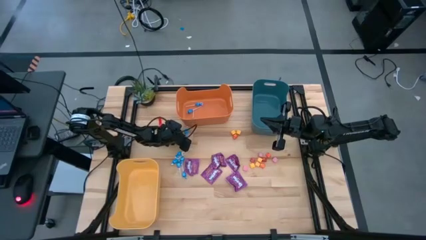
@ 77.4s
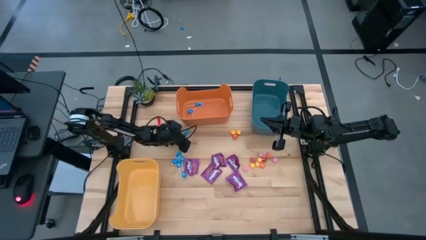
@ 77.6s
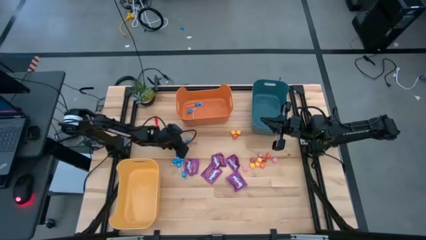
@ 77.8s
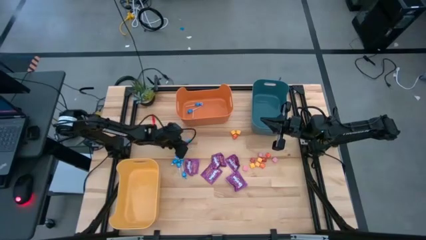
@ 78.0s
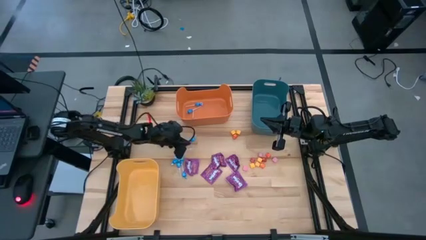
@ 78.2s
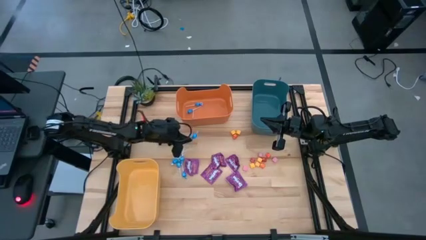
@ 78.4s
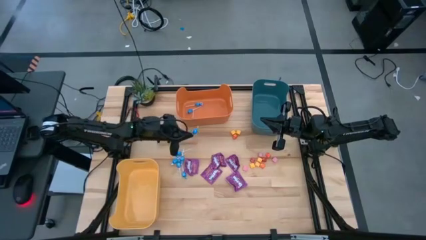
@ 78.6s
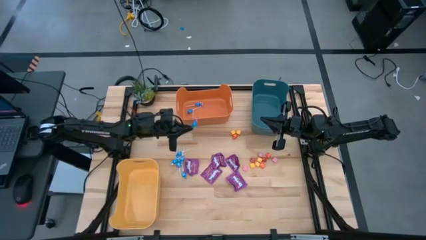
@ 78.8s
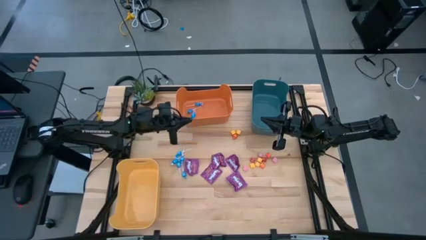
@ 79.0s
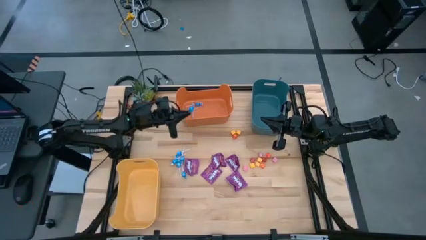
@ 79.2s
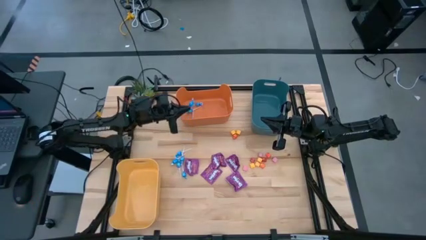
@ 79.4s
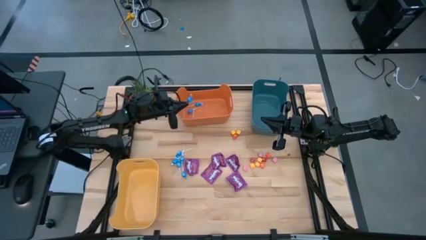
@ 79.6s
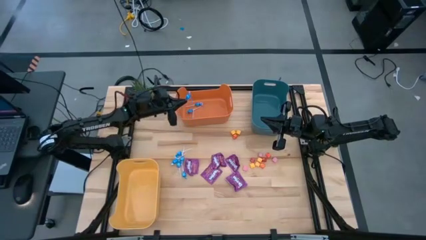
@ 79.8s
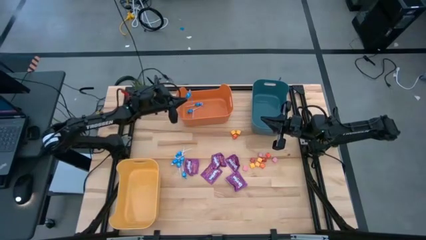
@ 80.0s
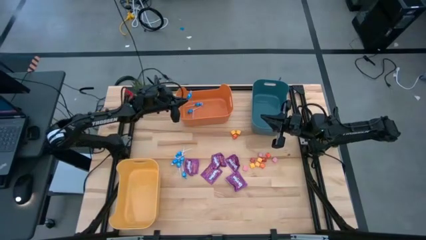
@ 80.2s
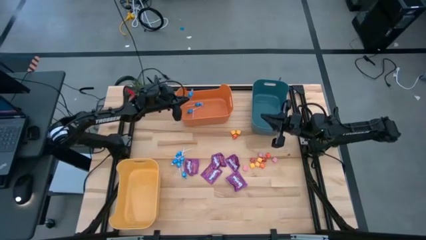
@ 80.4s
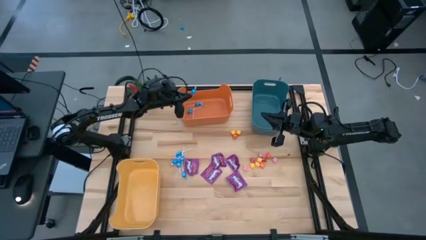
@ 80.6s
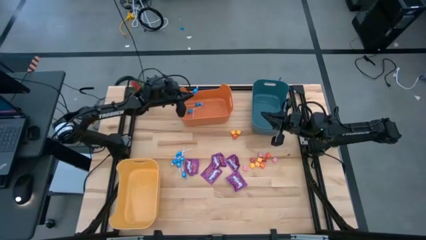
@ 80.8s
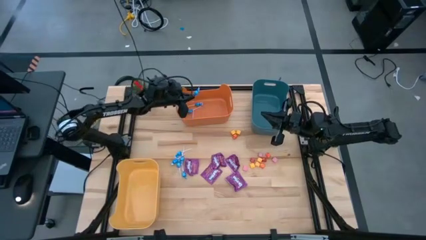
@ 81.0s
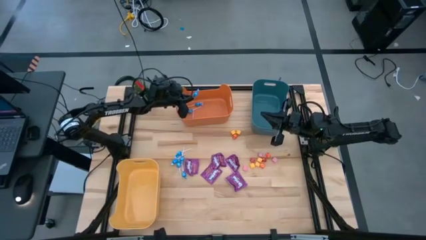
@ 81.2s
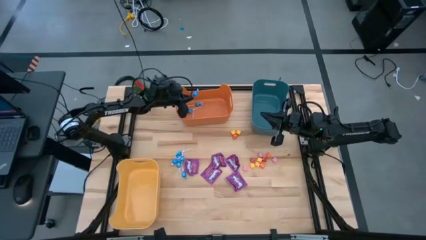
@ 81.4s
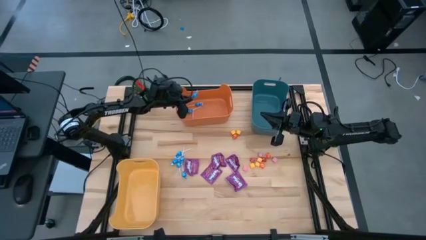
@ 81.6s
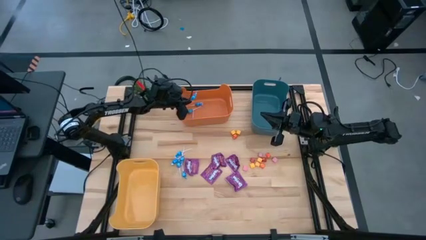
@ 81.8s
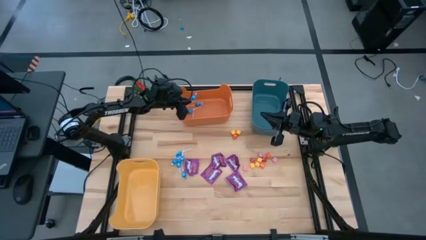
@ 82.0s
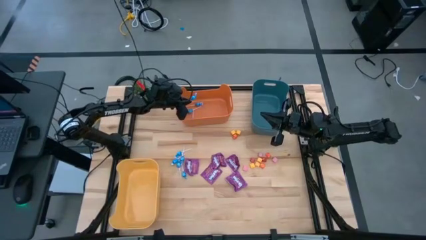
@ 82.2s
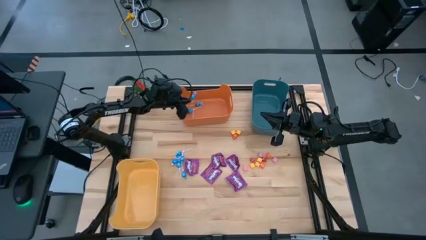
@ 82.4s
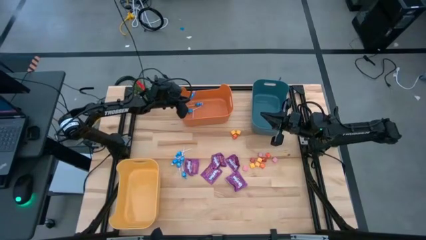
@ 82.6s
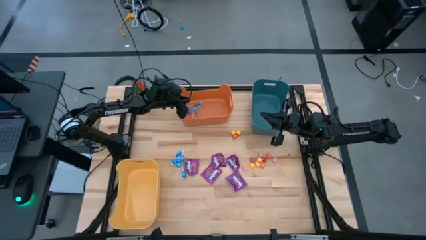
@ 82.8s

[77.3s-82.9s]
Task: Sort candy
Put the blue candy into the orange bin

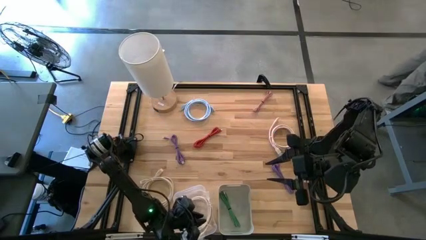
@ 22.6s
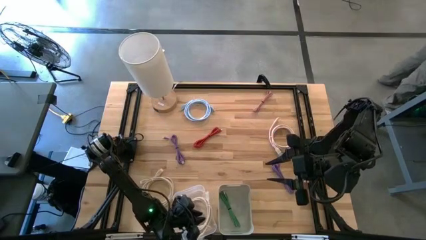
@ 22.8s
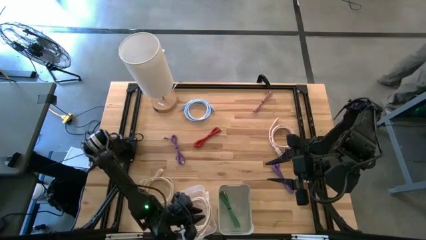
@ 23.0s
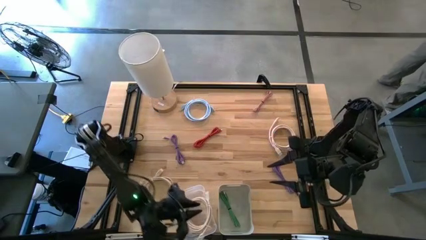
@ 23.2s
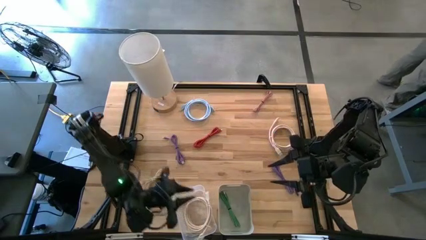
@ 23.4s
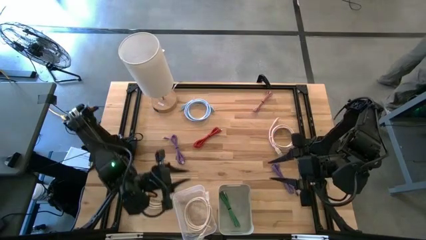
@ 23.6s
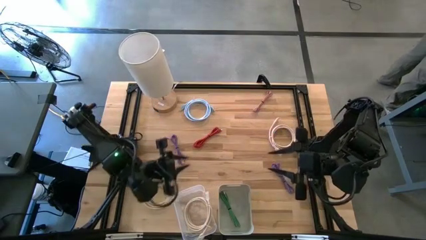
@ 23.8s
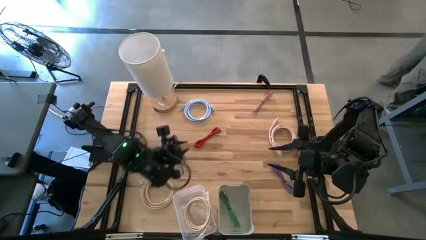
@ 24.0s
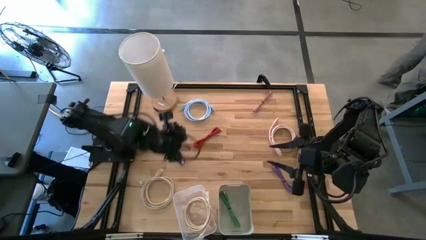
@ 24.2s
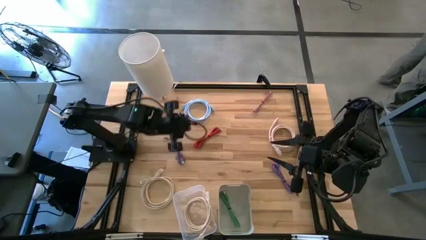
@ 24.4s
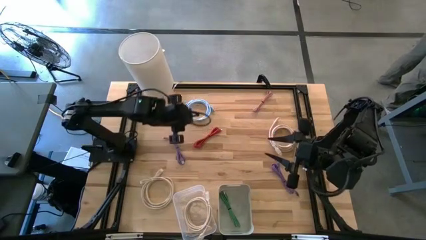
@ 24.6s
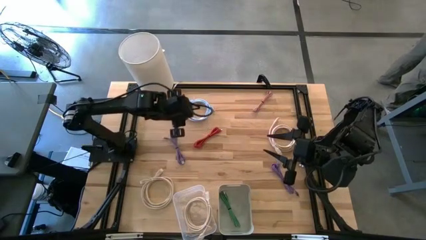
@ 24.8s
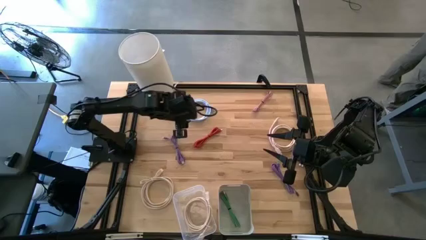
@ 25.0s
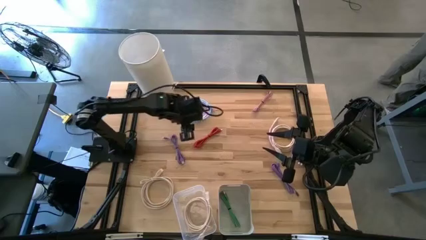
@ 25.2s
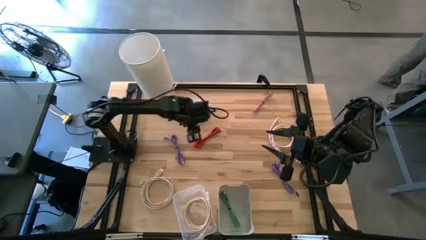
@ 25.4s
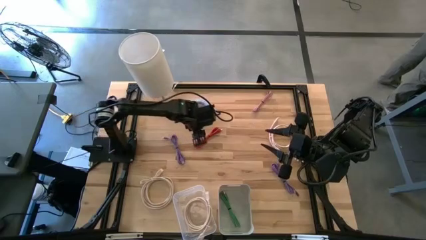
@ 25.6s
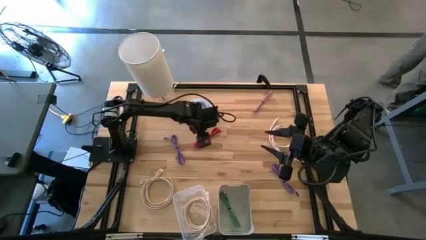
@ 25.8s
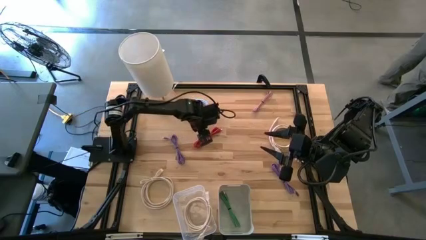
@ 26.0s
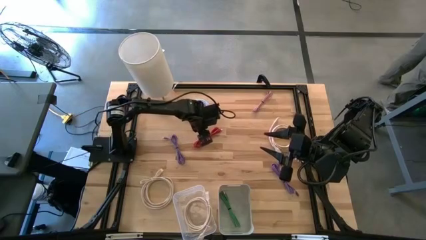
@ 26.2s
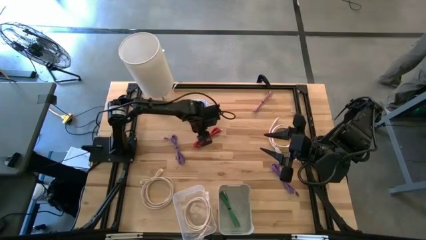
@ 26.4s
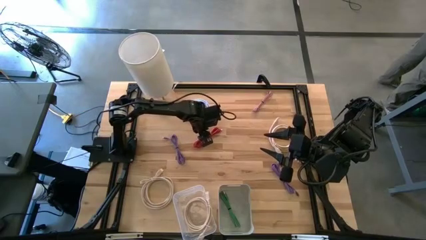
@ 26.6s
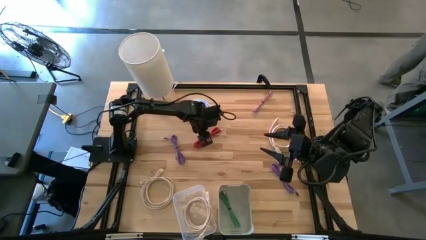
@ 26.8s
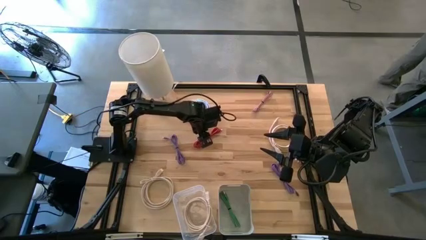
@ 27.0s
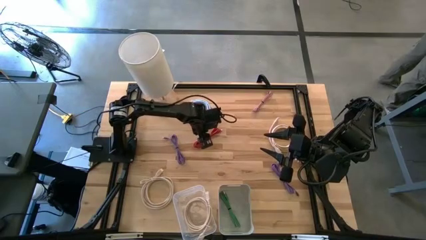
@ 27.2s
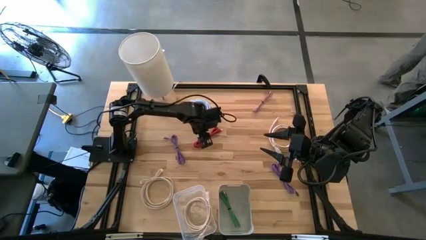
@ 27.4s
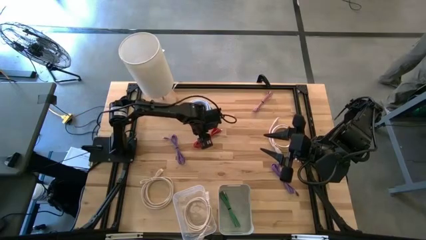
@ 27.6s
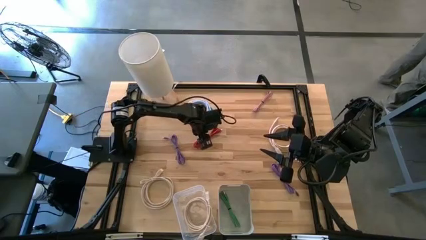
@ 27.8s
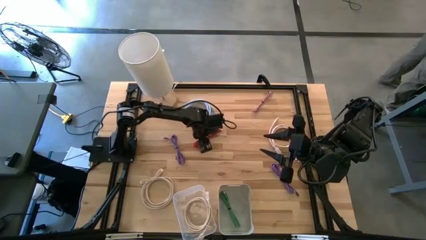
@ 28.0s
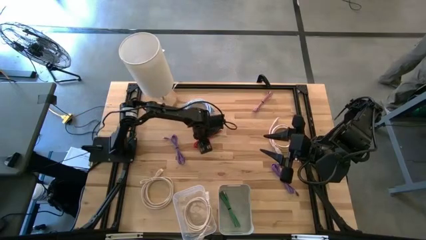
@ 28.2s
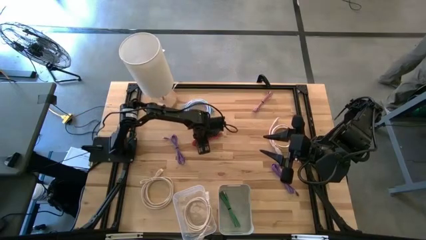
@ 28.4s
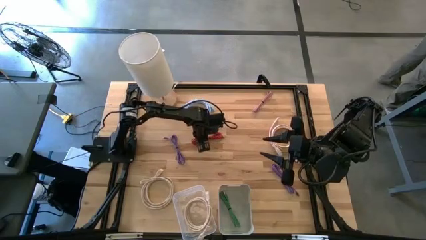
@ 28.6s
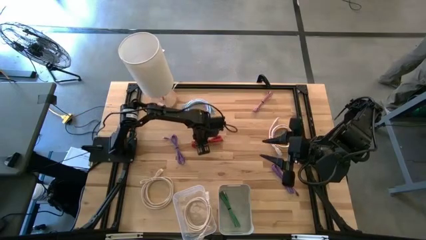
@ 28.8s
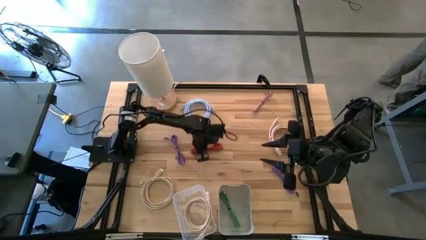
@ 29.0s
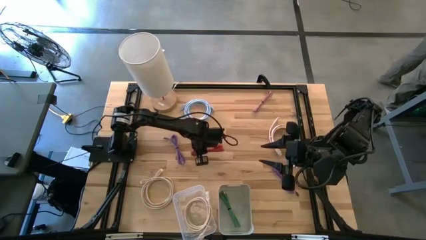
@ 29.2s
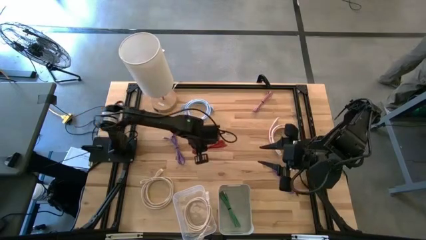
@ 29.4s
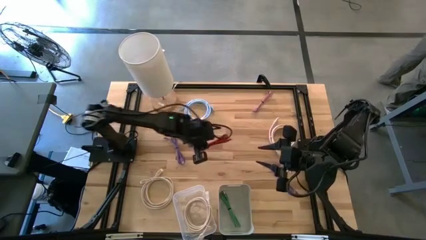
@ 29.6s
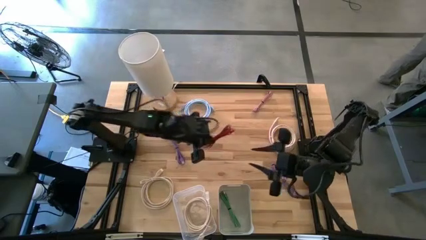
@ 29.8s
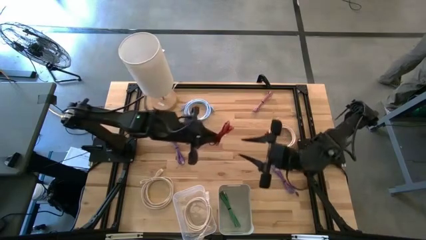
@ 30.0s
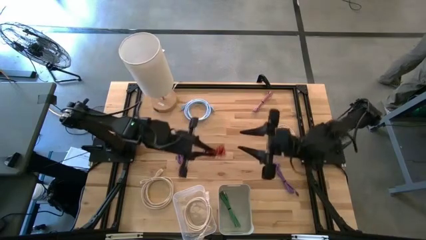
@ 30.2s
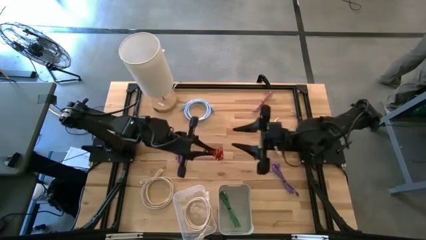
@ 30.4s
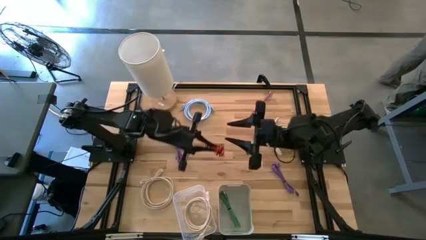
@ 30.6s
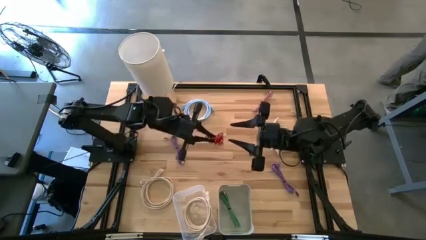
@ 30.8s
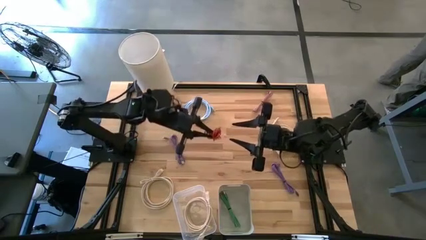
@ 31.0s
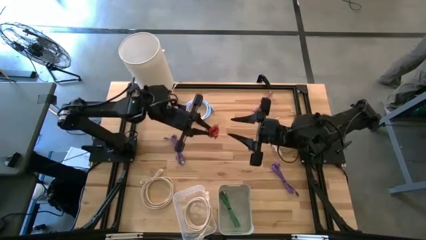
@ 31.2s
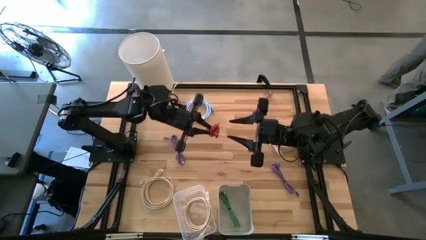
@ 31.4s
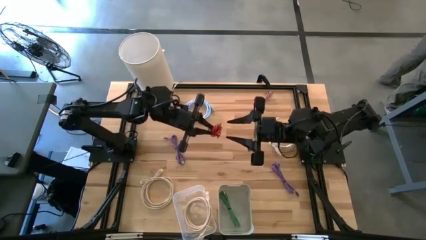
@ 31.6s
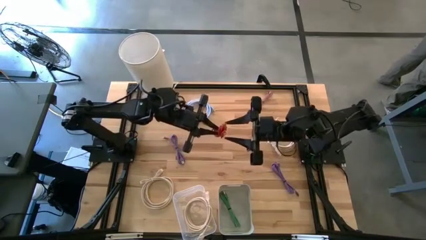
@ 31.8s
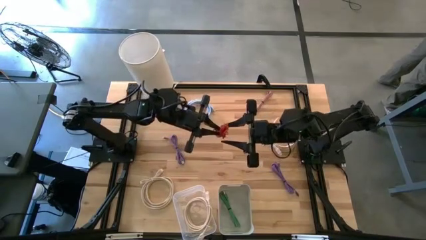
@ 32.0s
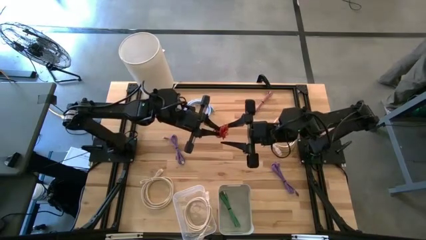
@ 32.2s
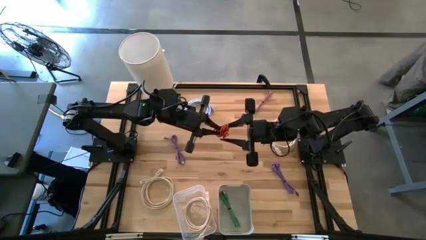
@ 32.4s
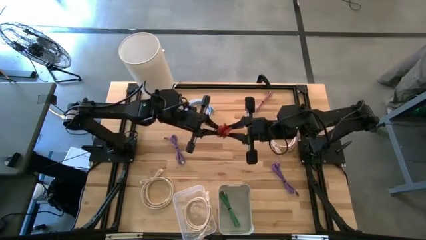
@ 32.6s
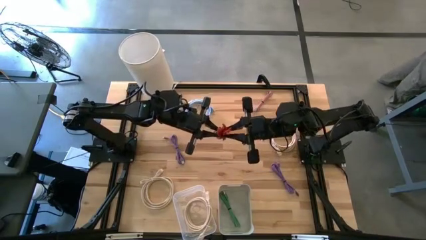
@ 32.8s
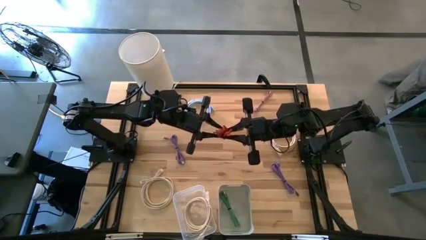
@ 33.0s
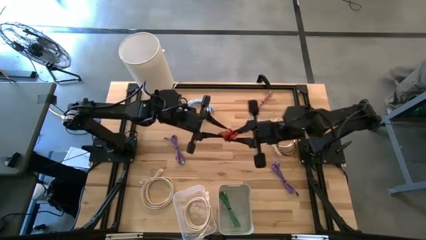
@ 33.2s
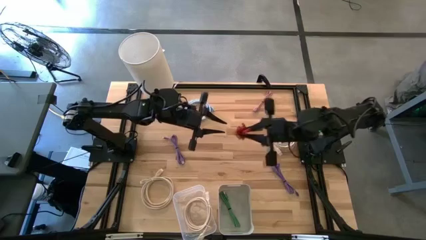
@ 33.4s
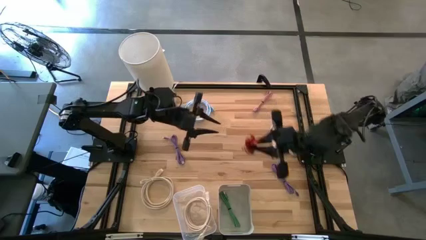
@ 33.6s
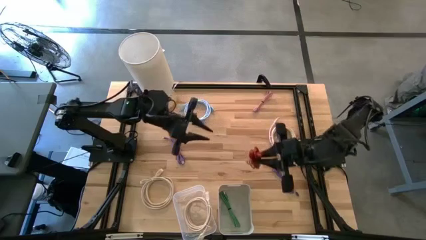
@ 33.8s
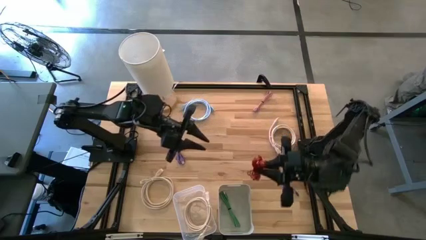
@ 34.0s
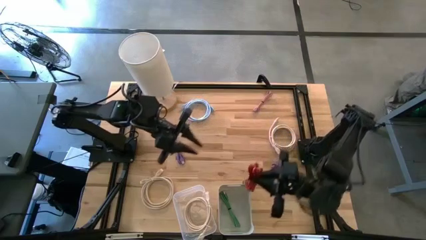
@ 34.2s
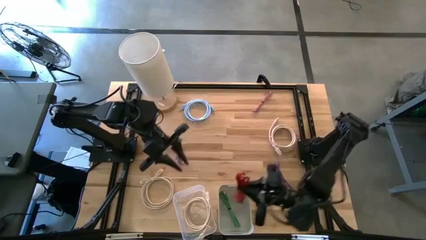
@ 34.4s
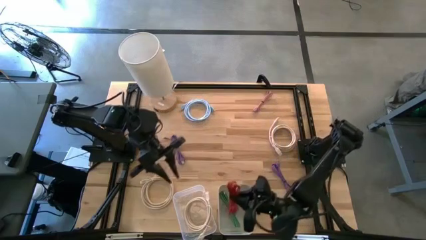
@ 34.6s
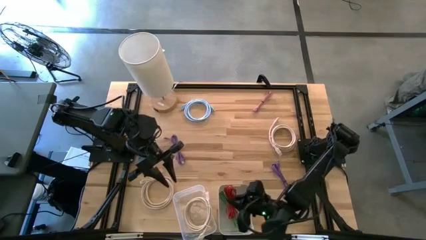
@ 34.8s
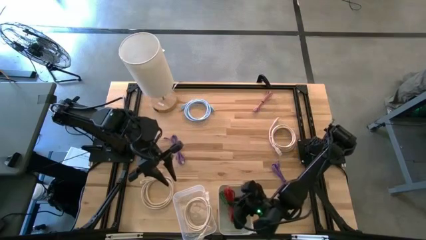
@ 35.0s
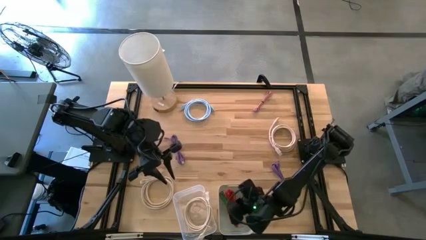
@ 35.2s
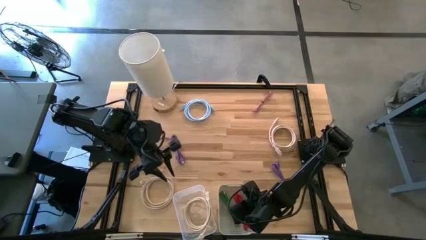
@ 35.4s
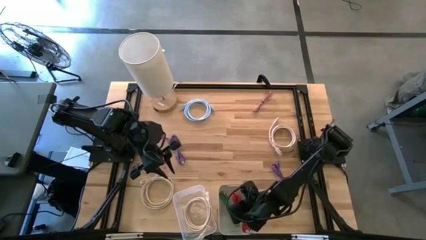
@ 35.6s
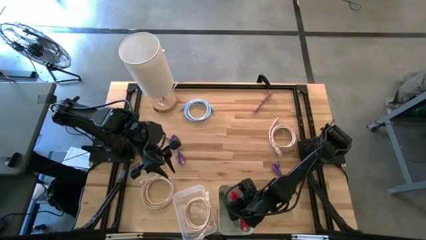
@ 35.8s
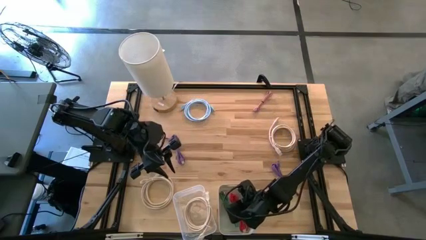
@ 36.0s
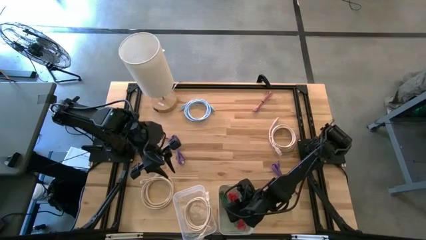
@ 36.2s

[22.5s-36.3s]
Task: Pick & Place USB Port
Put the red USB cable into the white bin
